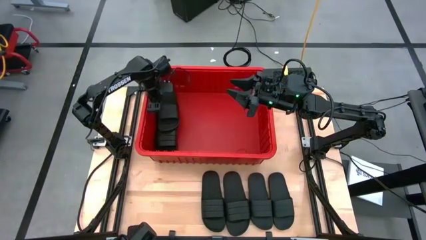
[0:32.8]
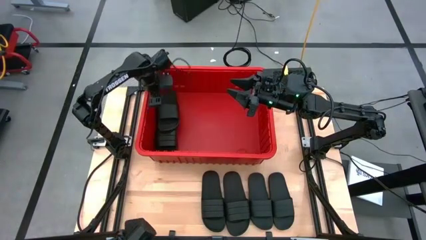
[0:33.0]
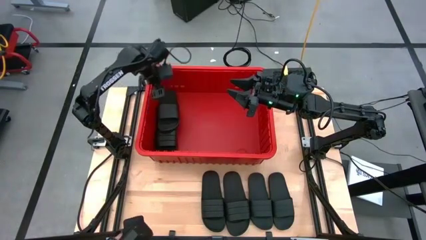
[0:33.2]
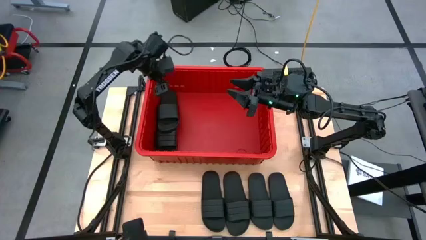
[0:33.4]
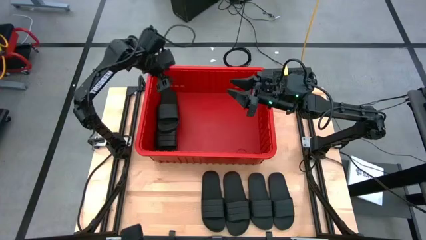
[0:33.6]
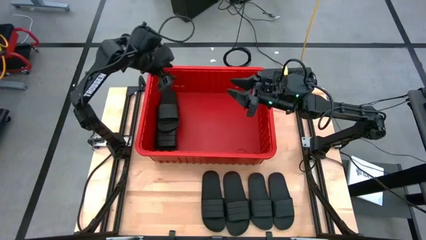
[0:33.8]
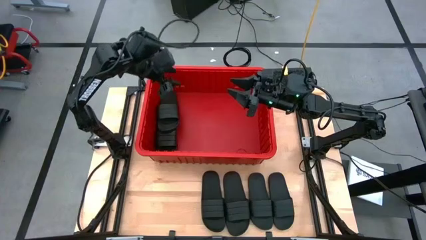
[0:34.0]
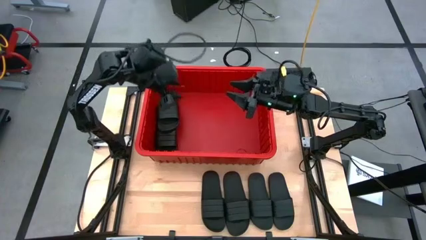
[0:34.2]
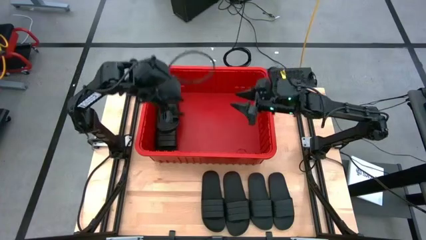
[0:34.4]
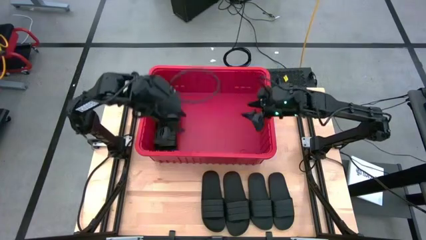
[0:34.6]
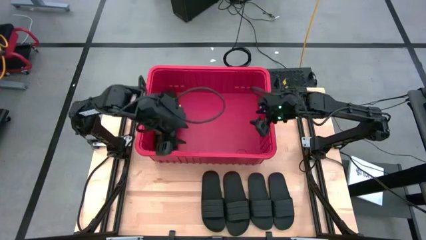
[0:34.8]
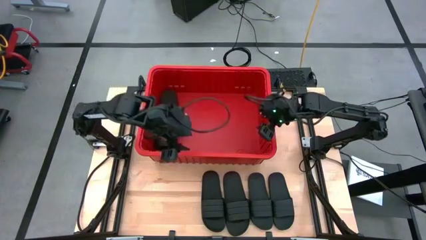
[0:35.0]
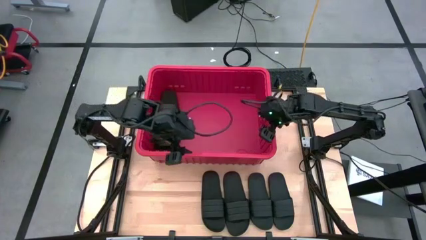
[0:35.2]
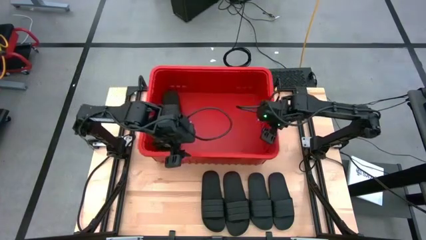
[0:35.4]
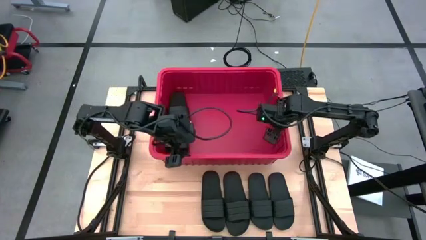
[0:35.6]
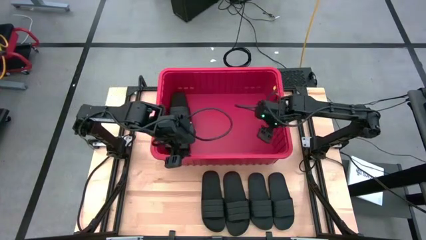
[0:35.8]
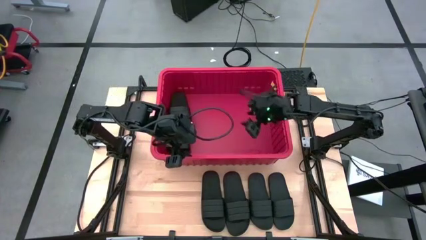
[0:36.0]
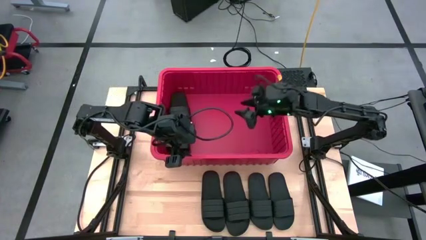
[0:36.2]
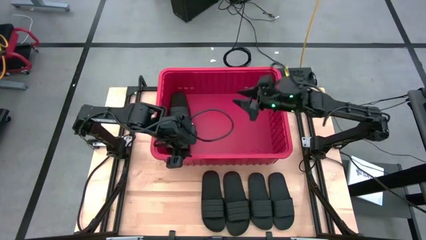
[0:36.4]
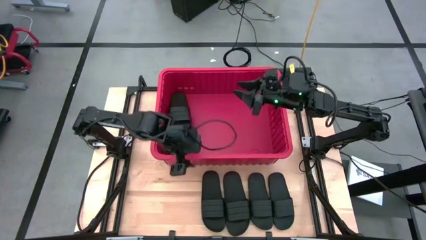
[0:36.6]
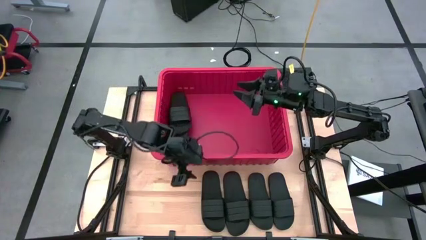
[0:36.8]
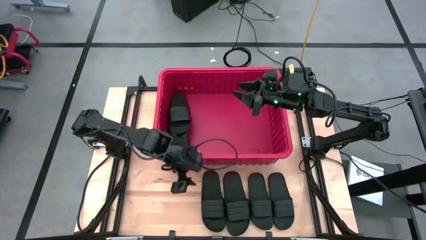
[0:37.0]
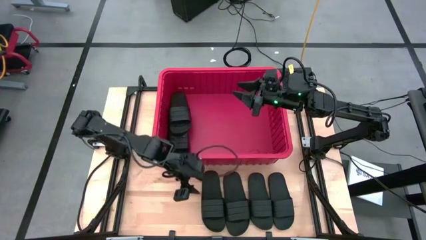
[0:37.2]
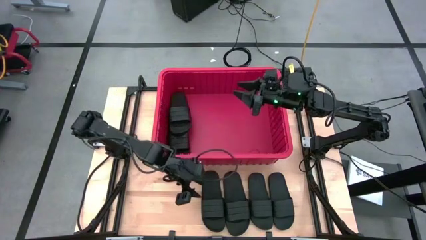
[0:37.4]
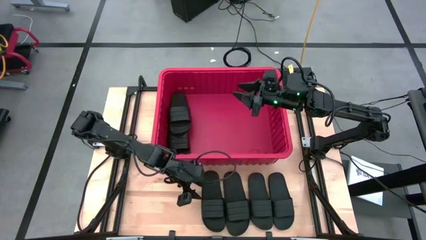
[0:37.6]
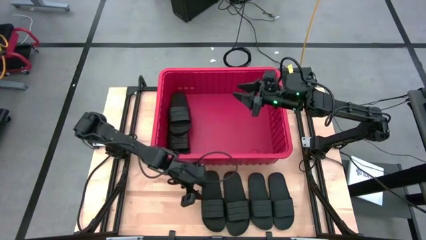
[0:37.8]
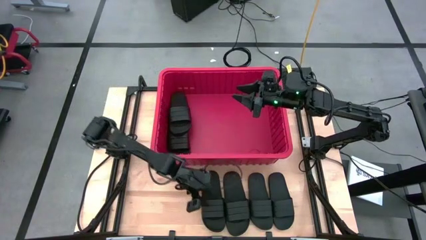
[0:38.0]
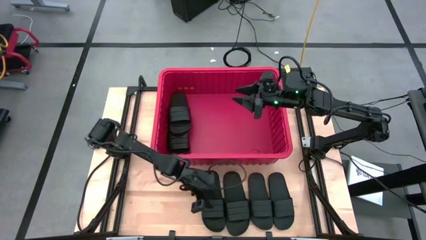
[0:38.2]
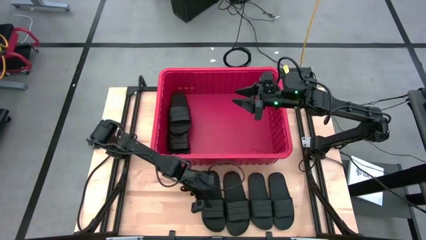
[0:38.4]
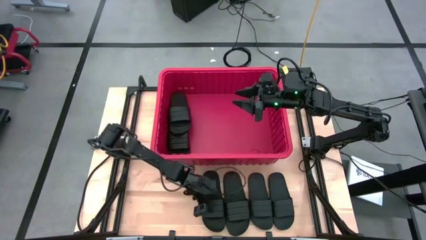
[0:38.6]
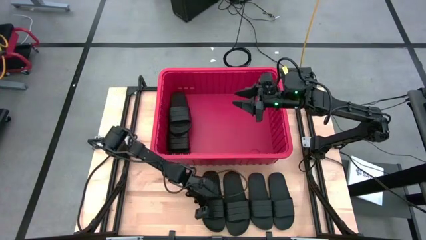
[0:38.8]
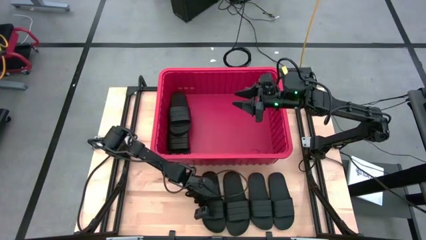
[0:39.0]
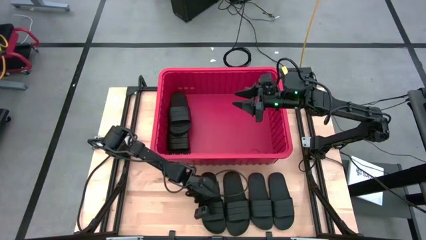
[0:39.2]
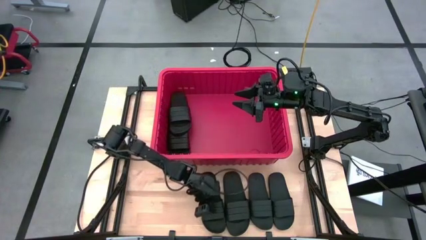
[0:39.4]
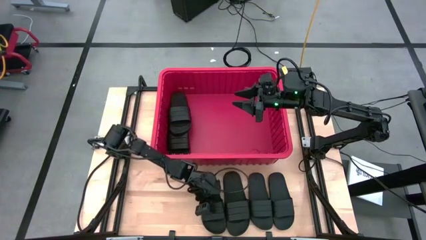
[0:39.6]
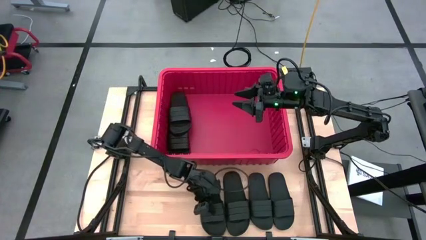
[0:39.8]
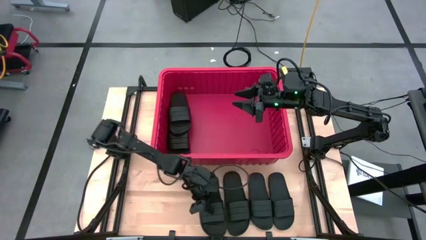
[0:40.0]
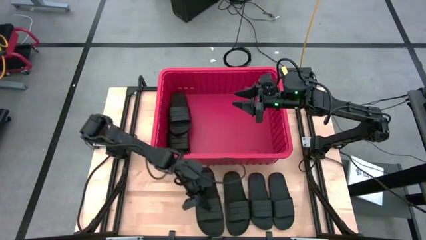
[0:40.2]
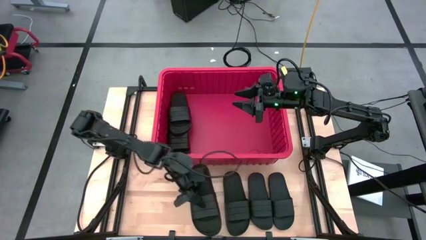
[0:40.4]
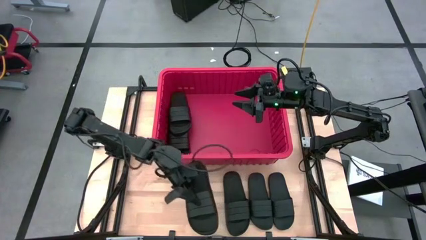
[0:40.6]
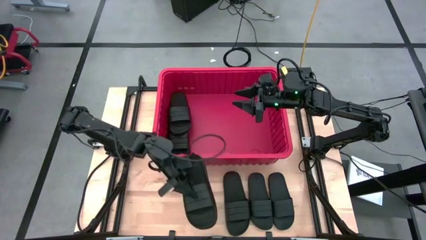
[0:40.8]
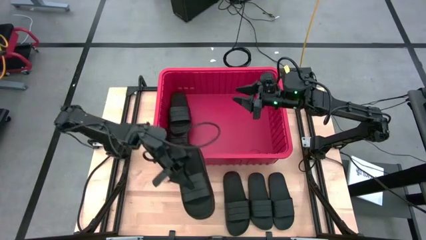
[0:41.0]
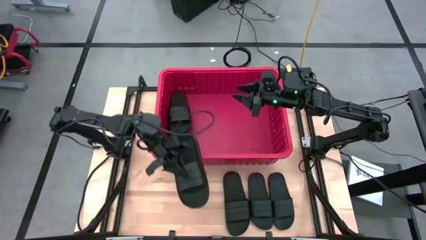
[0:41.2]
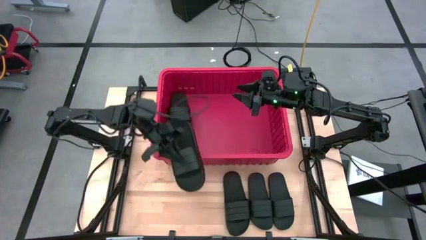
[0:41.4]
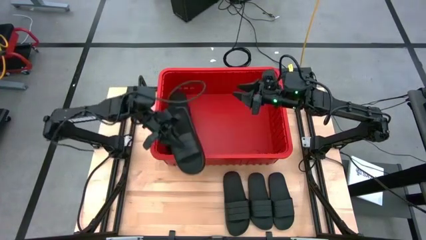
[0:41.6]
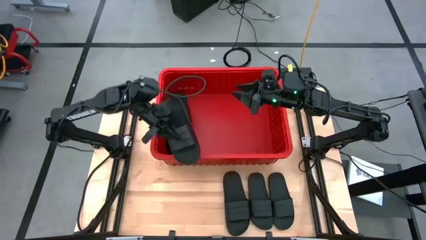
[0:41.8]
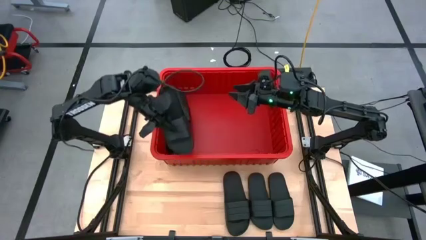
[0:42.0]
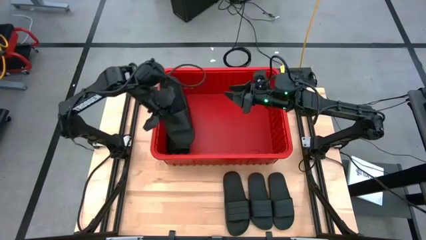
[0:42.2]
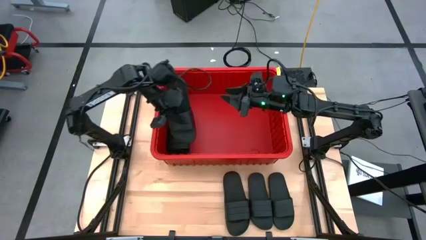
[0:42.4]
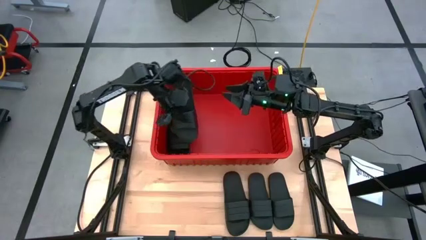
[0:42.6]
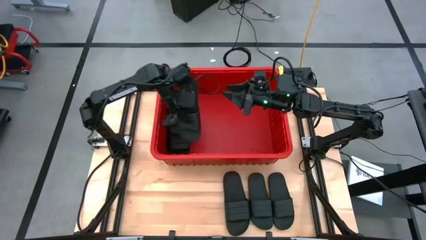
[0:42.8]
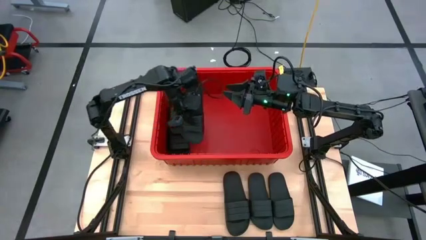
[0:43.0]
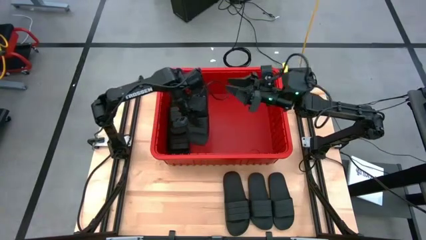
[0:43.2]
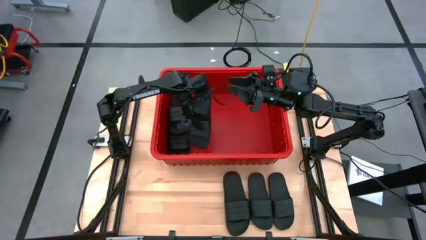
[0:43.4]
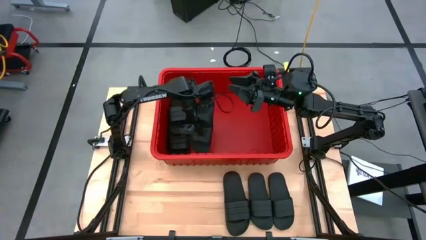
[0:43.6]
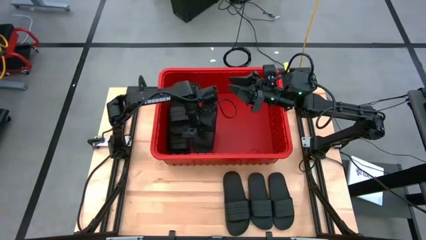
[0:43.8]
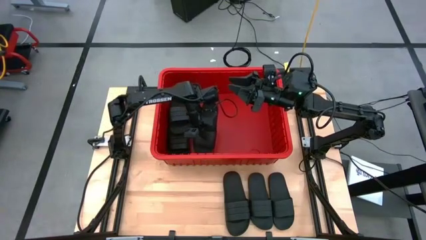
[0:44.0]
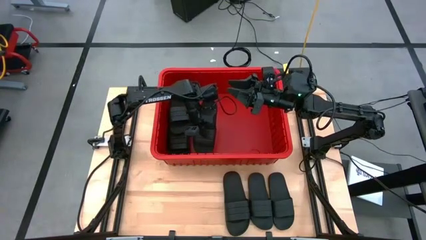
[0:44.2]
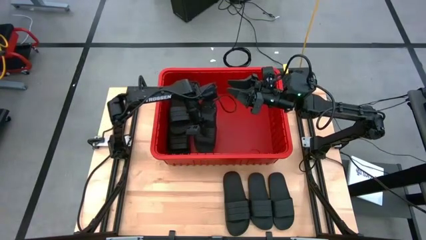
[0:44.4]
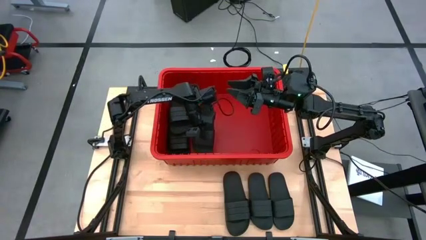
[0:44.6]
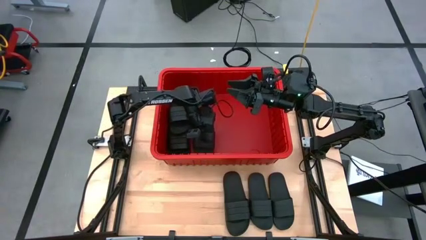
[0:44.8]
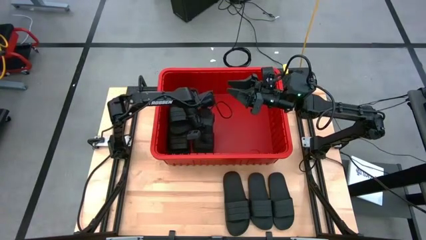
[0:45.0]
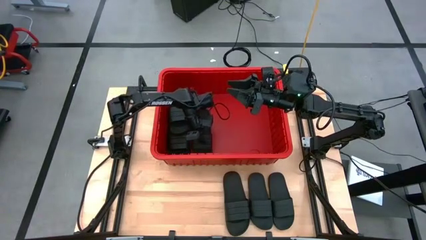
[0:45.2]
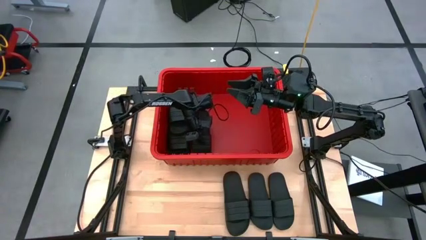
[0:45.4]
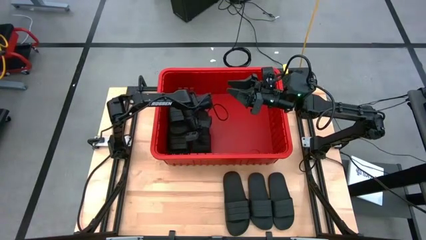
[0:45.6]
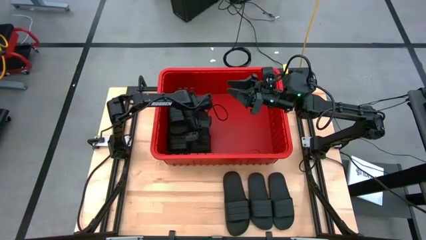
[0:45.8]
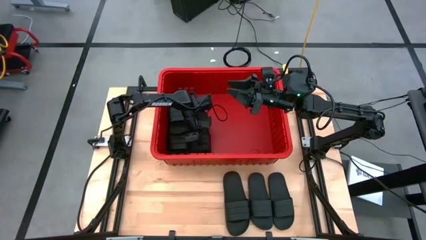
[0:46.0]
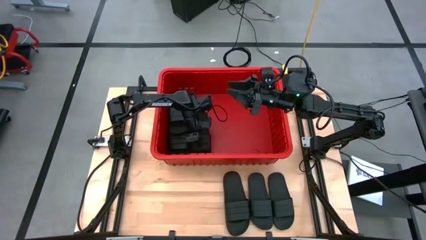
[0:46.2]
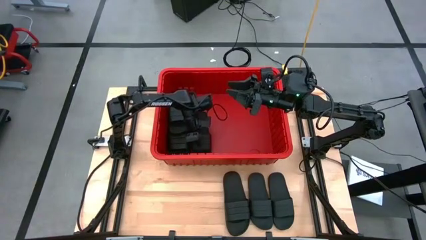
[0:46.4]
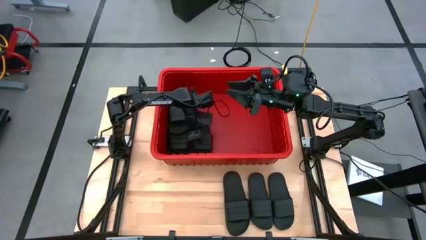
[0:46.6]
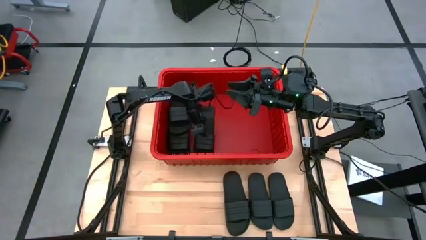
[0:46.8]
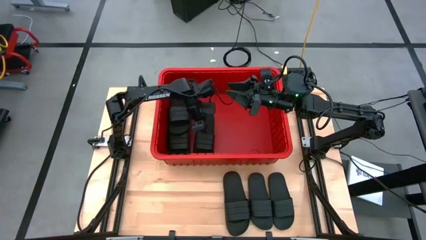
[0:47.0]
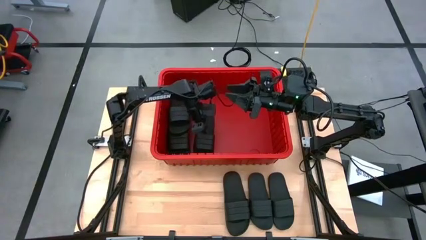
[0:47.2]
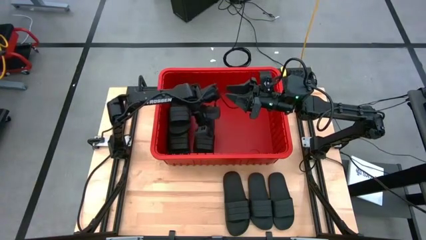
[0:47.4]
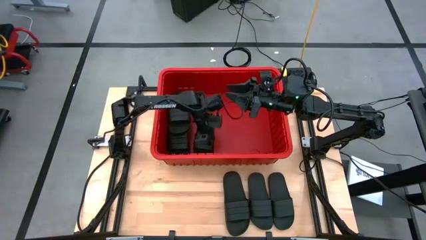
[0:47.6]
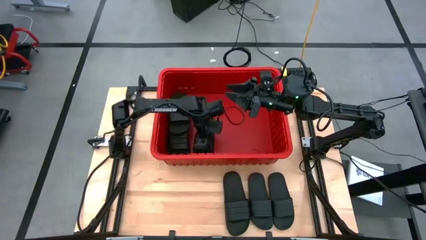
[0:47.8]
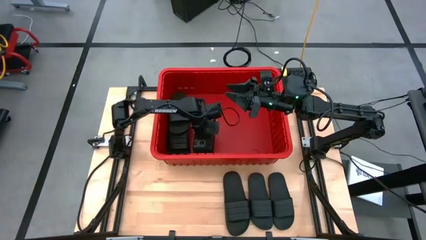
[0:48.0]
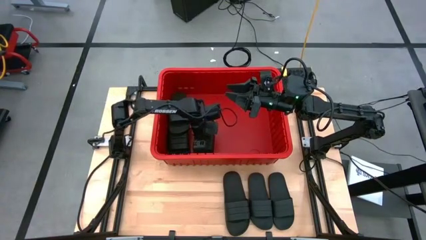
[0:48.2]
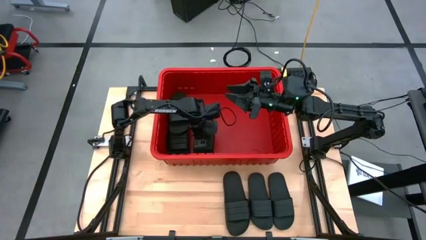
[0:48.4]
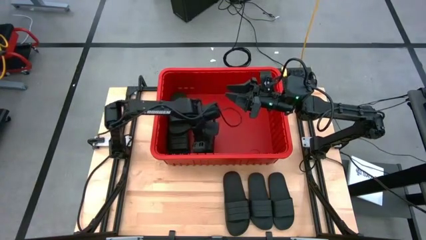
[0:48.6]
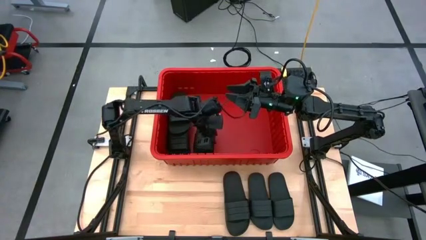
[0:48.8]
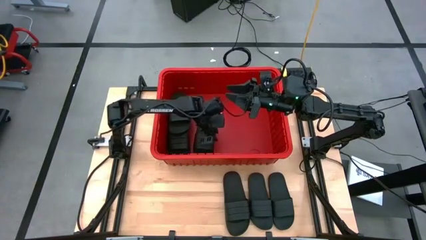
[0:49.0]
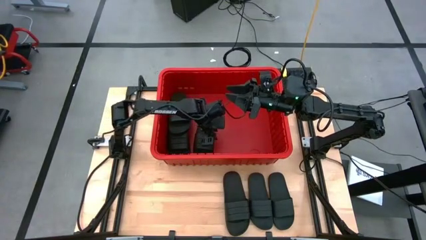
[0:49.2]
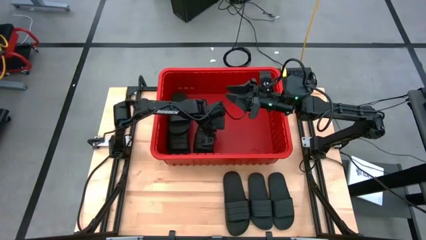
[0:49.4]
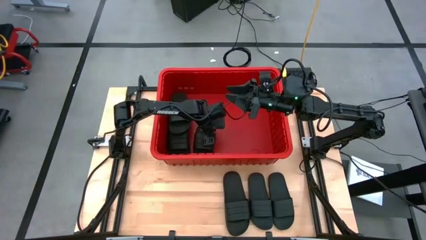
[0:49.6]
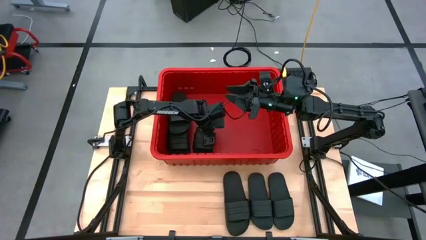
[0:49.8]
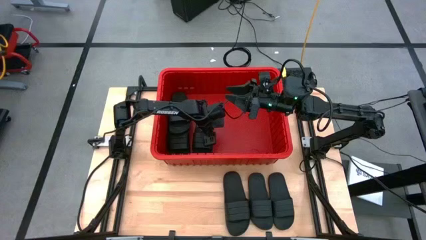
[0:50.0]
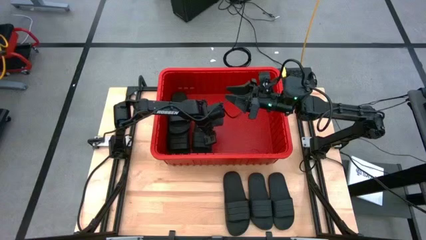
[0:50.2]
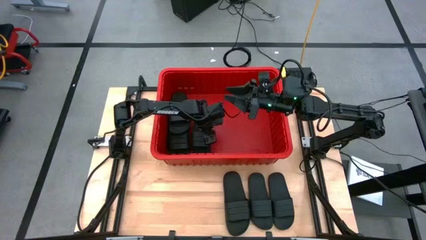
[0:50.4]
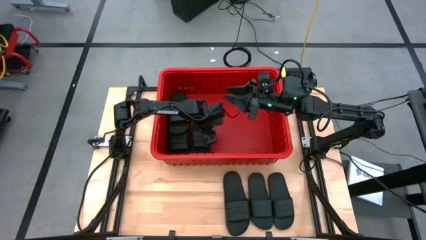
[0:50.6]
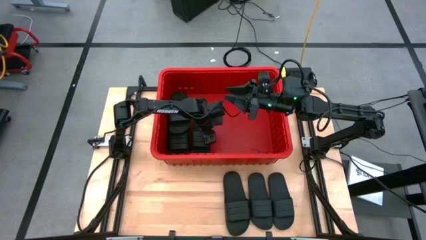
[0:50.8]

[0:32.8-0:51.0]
Task: Pick and place slides into bin
Put the black slide into the red bin
